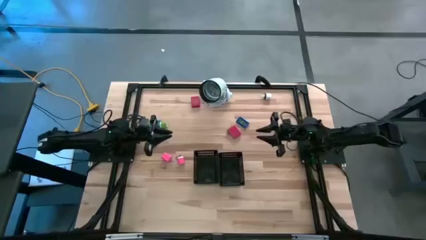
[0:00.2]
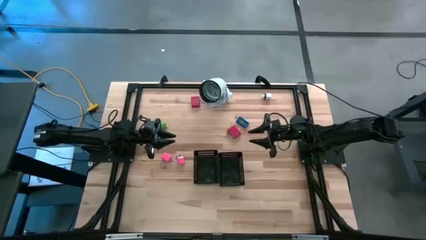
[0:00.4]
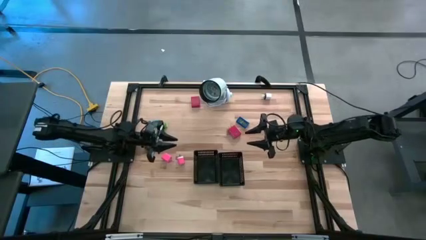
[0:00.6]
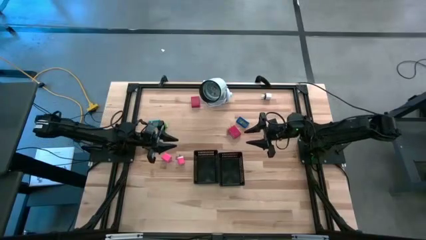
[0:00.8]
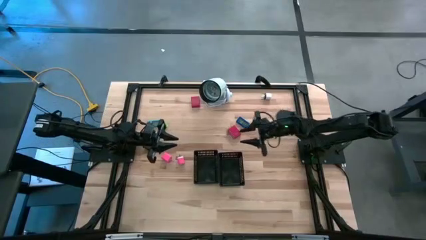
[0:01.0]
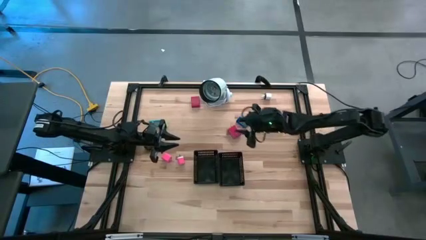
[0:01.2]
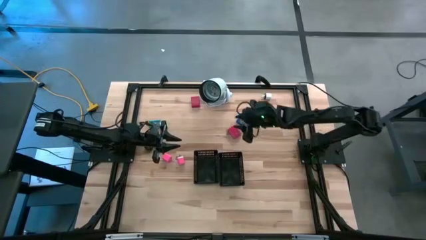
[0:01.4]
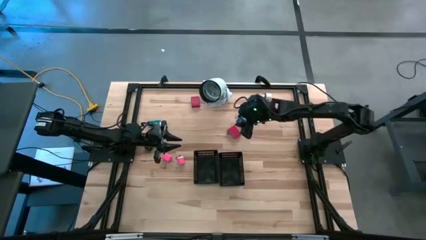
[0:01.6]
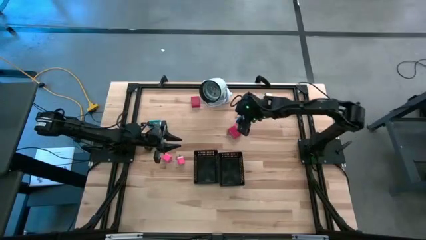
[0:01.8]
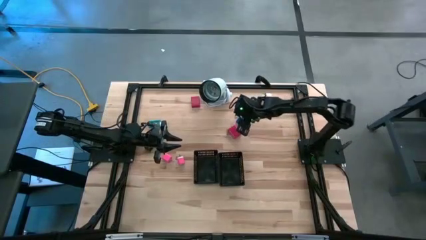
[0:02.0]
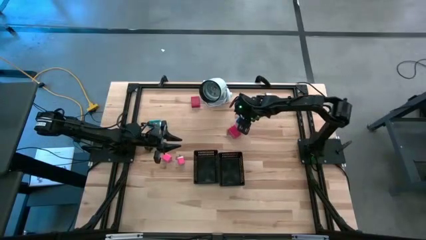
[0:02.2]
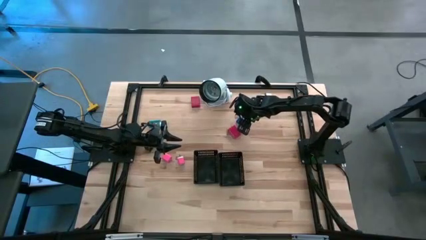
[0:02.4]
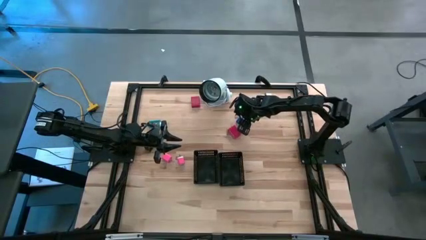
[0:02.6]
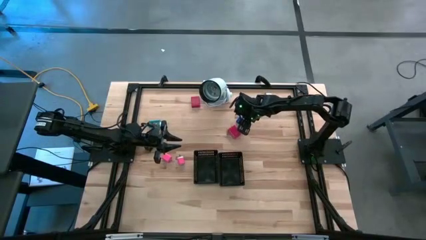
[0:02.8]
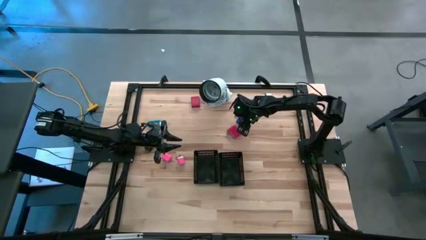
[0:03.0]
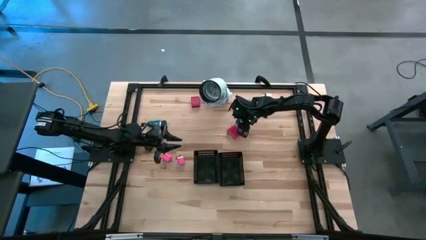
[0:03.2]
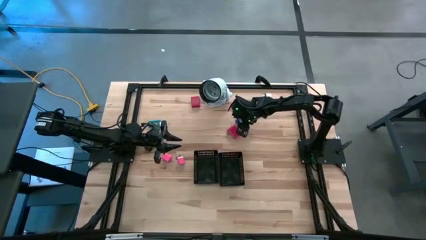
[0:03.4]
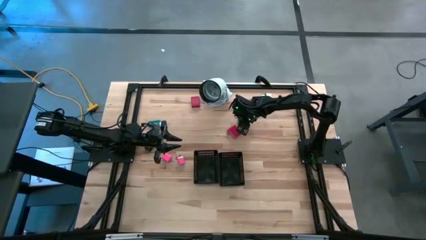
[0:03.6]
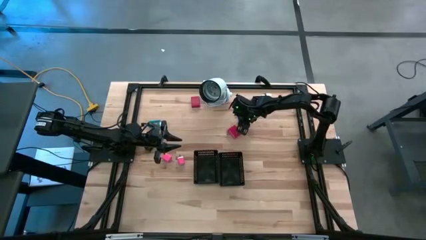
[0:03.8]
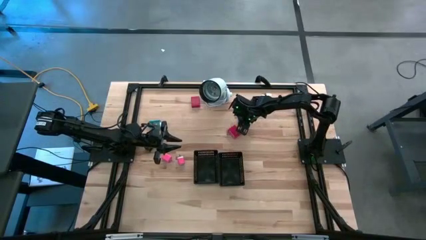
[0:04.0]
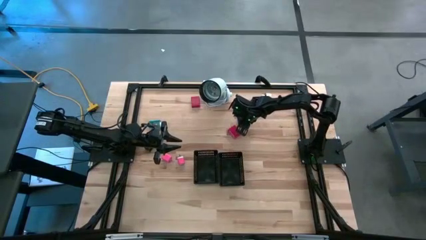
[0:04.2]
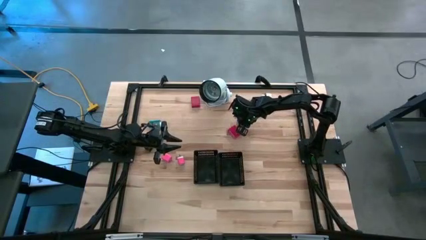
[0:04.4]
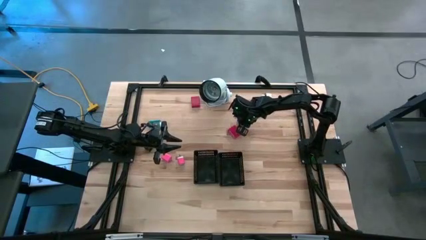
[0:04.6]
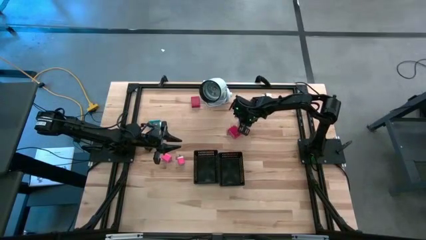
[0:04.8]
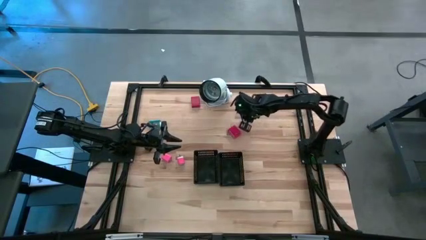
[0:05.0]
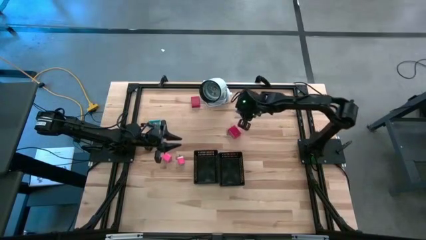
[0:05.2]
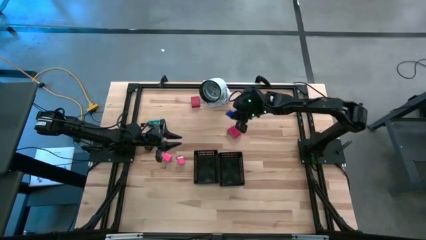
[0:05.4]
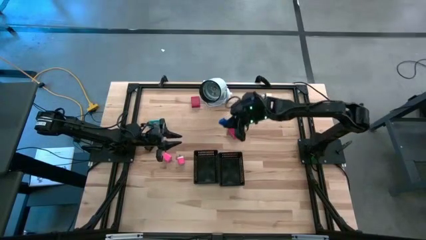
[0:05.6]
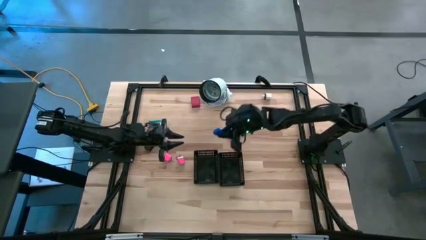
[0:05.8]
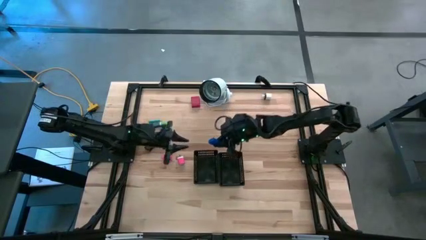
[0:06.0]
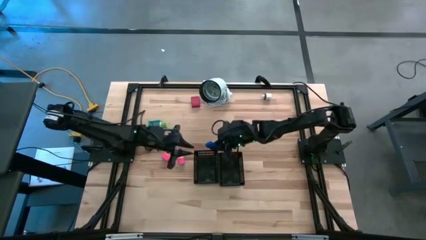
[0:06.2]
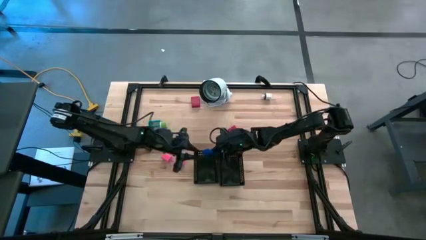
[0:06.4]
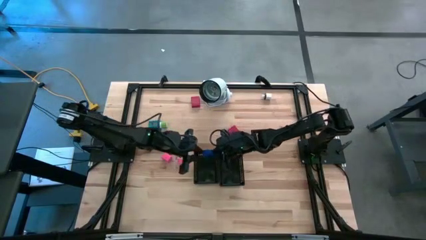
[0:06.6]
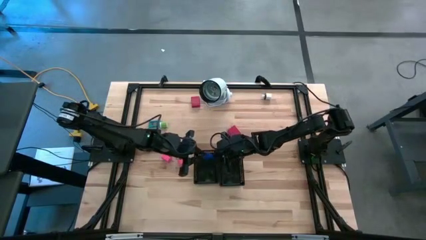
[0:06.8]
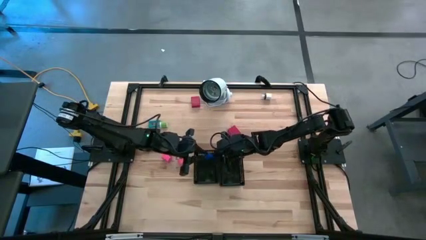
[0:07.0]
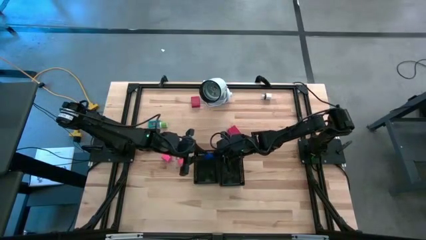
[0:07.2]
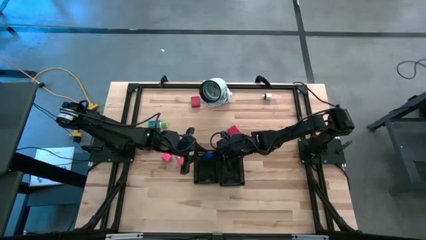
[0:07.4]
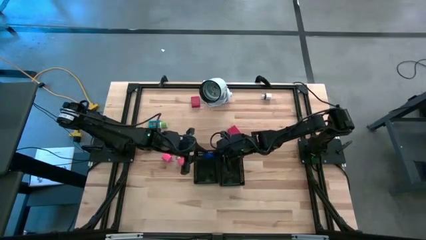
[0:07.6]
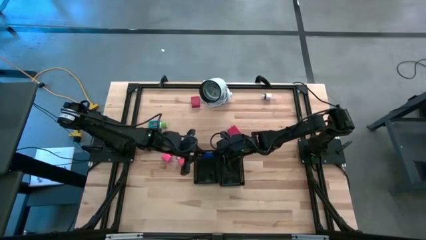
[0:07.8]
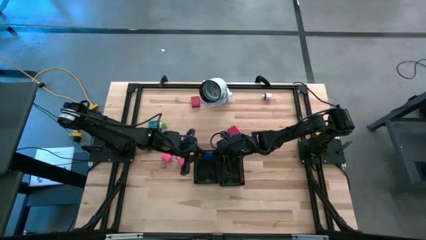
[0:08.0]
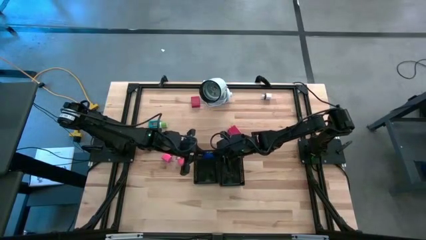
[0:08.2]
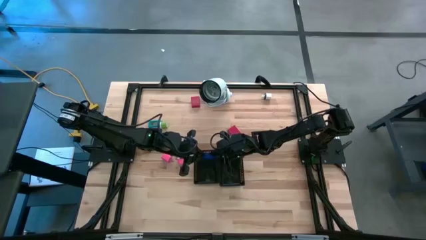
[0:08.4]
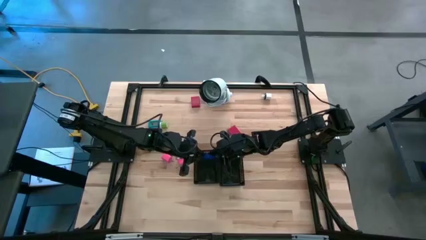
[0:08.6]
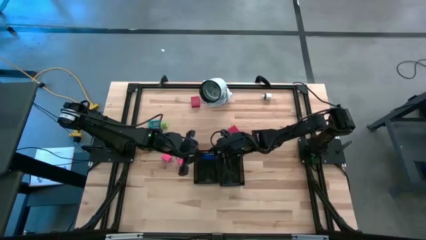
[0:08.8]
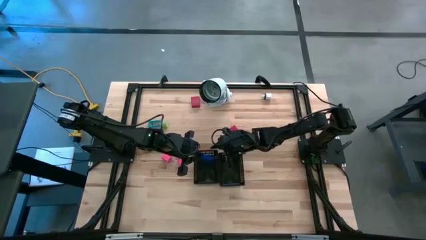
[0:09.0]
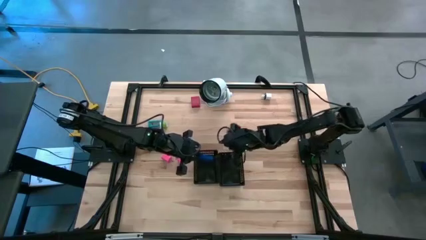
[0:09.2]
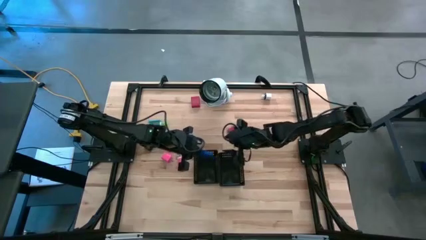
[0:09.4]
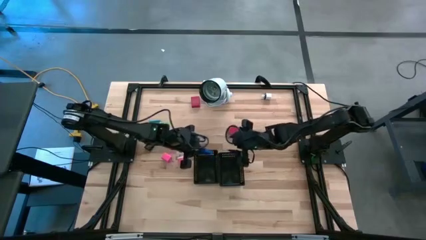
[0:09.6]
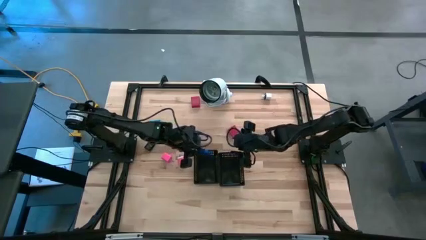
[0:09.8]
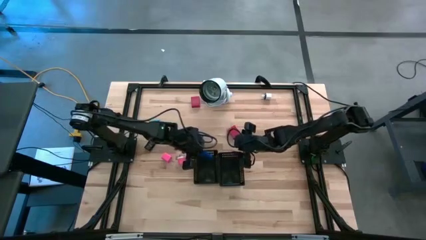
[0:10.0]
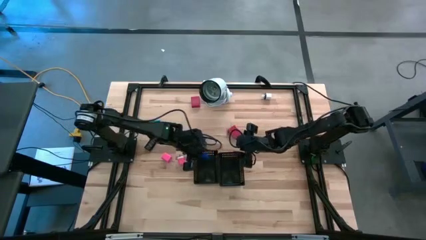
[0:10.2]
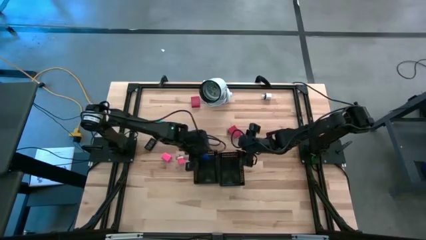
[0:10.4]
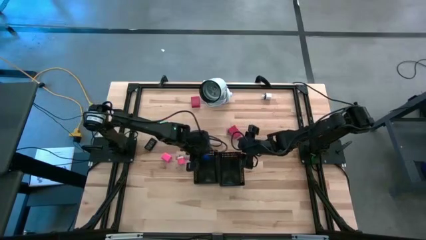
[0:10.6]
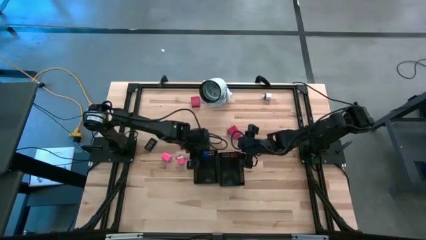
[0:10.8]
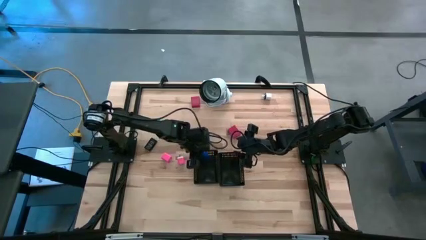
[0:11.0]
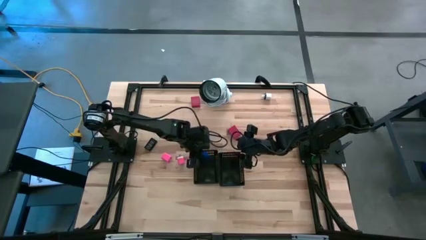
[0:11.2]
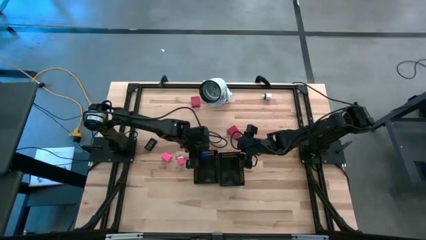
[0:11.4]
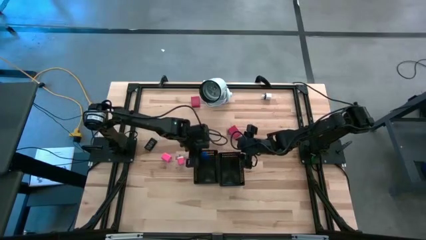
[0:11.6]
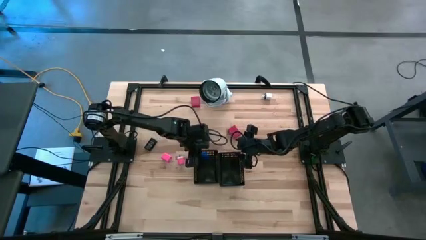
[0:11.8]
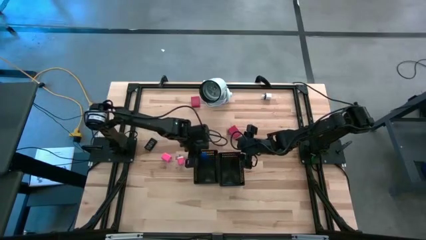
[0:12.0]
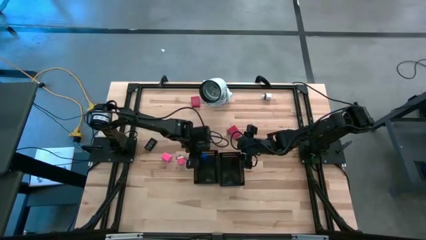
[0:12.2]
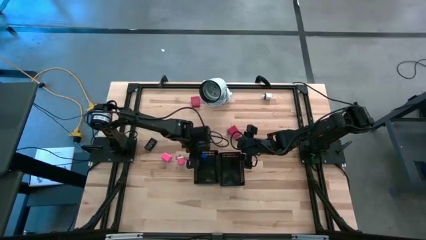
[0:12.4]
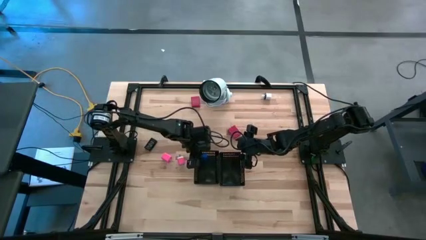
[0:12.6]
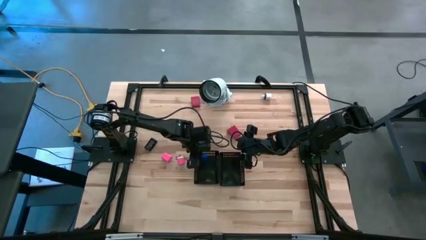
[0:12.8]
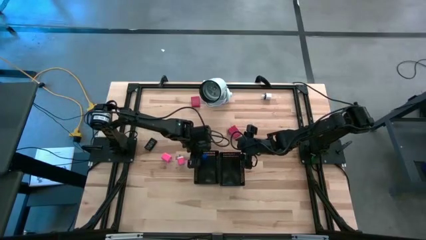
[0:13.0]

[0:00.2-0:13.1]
Task: Pick & Place Office items
Put the blue digital clock into the left black bin
